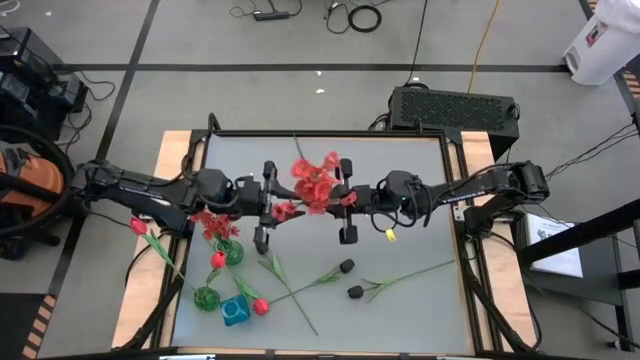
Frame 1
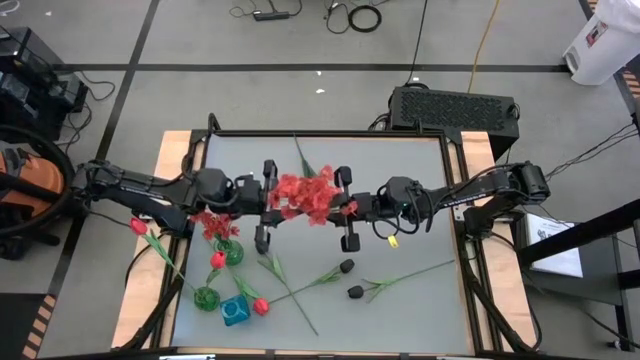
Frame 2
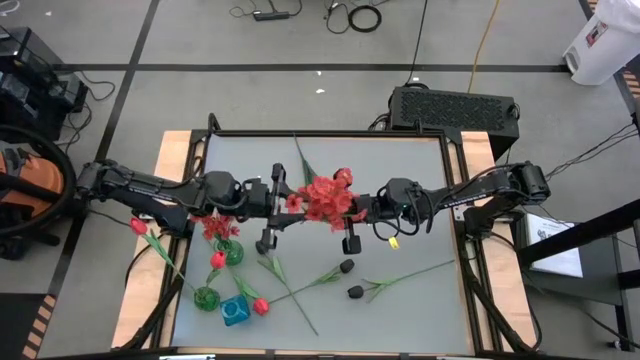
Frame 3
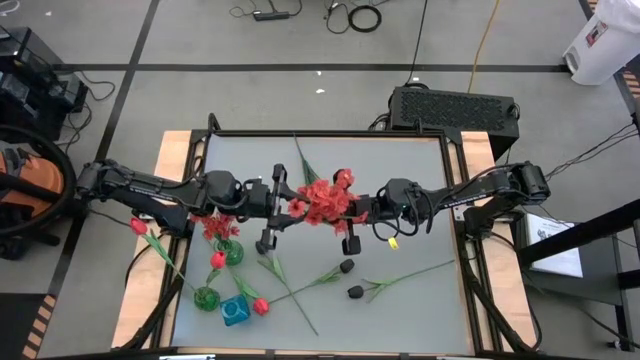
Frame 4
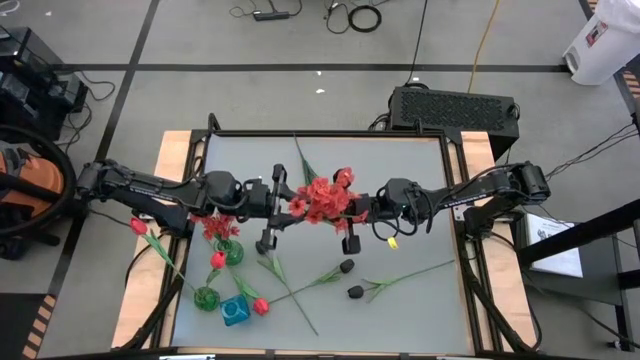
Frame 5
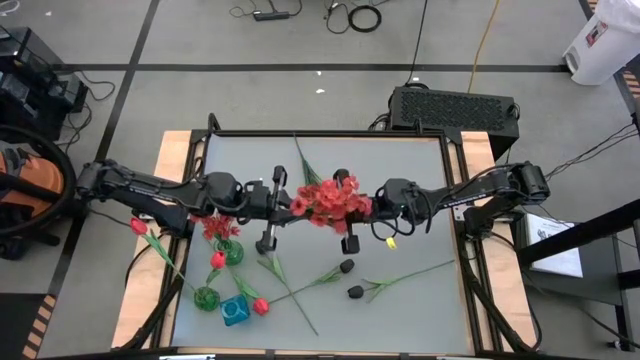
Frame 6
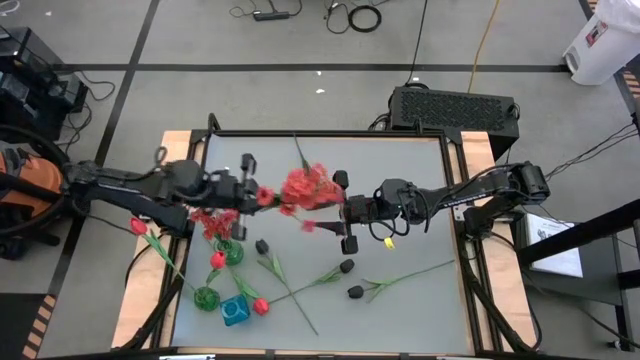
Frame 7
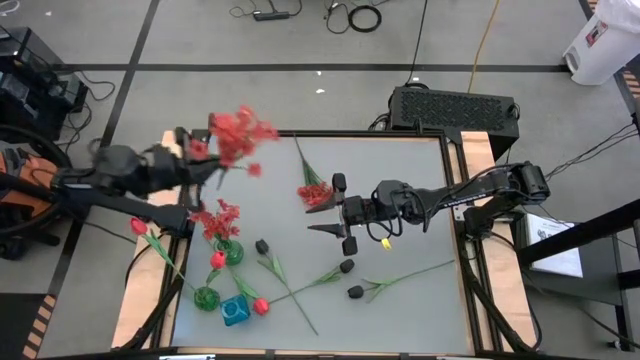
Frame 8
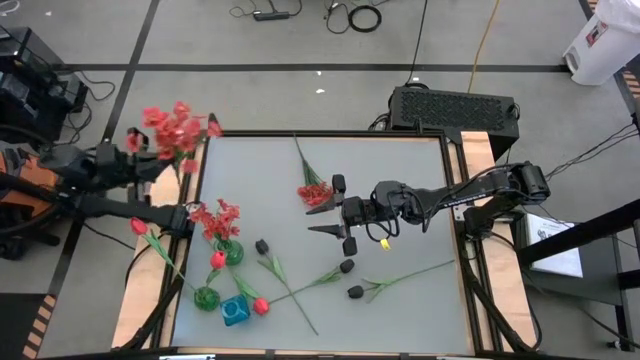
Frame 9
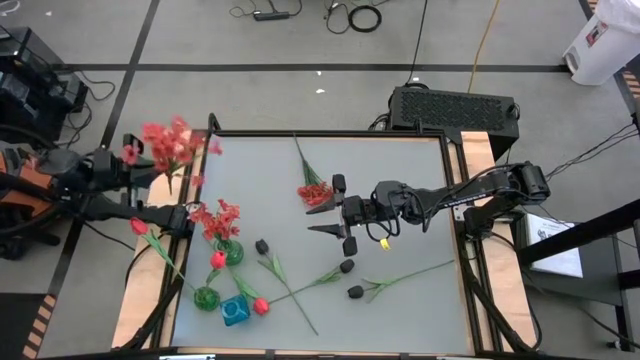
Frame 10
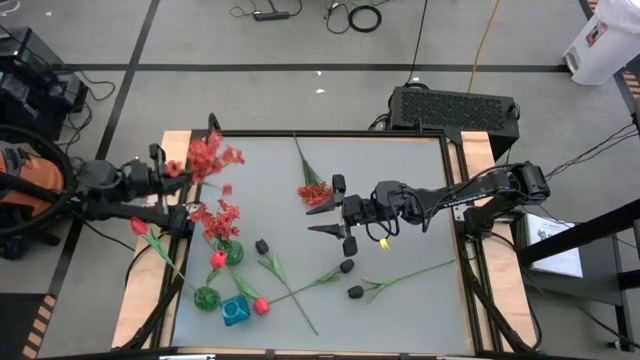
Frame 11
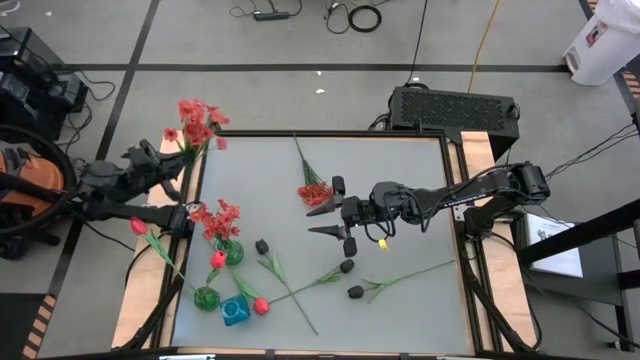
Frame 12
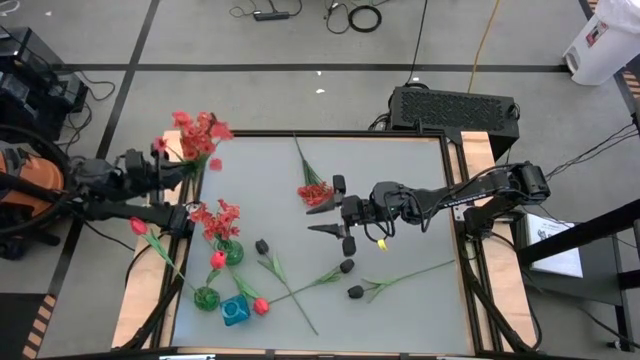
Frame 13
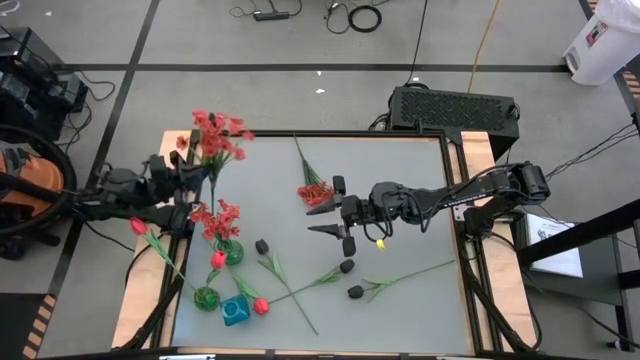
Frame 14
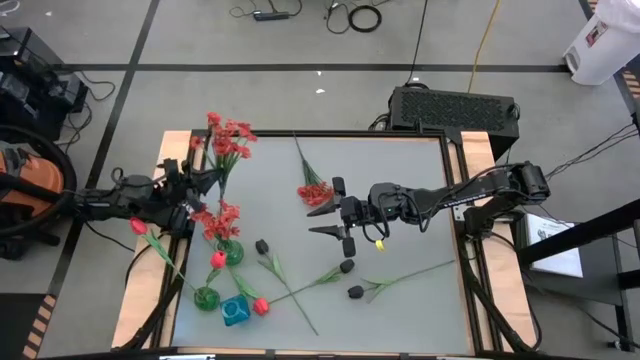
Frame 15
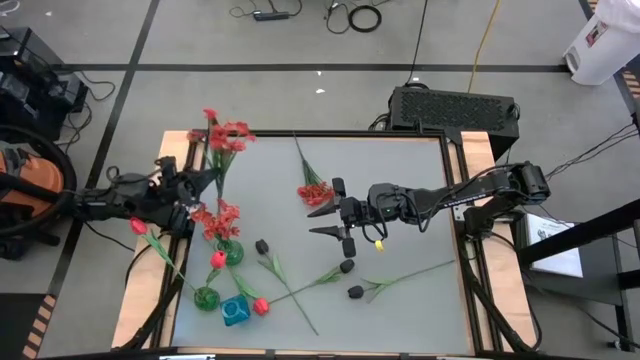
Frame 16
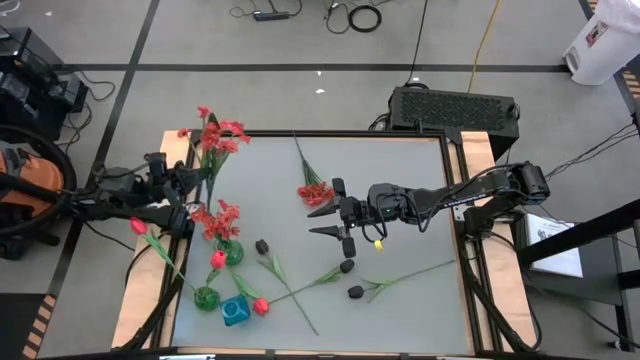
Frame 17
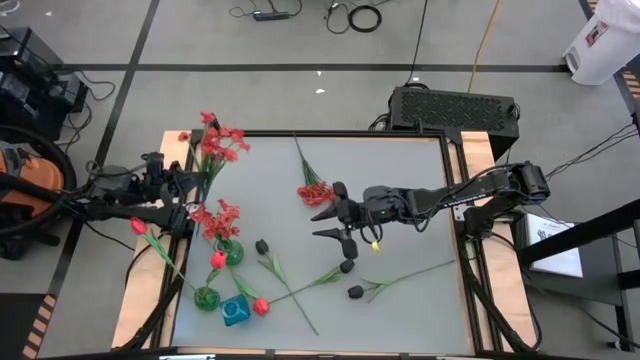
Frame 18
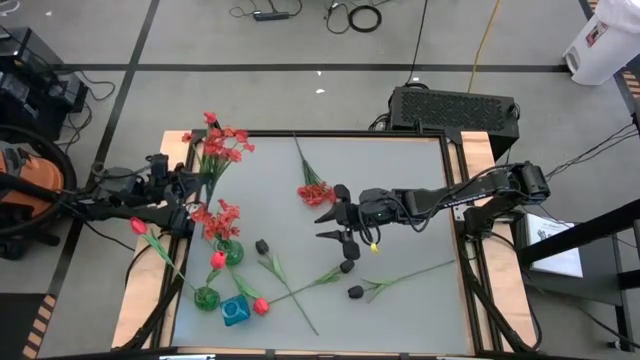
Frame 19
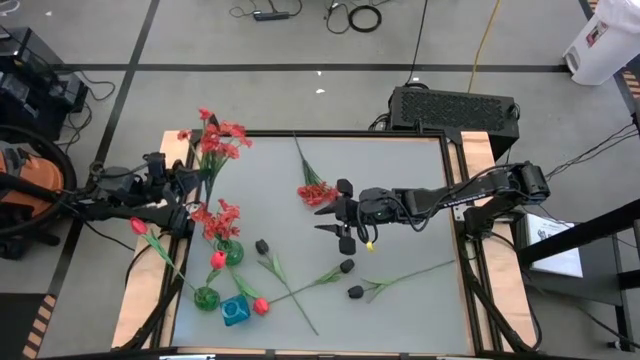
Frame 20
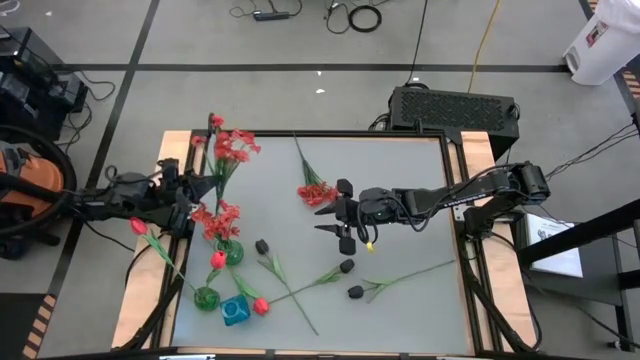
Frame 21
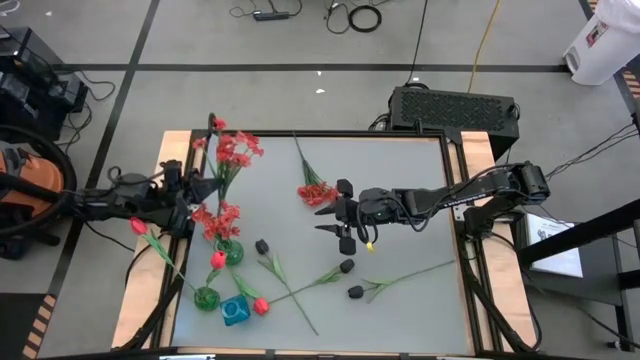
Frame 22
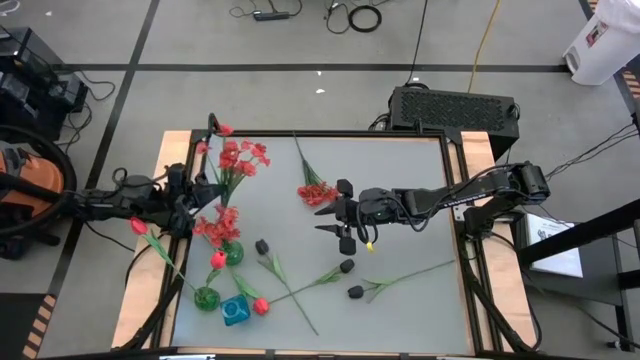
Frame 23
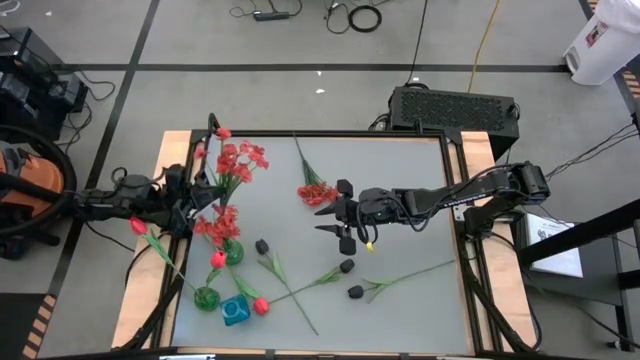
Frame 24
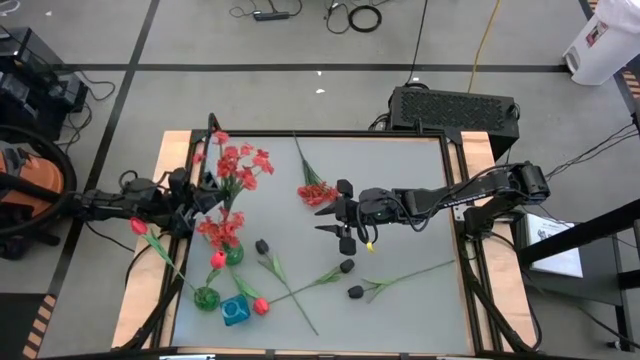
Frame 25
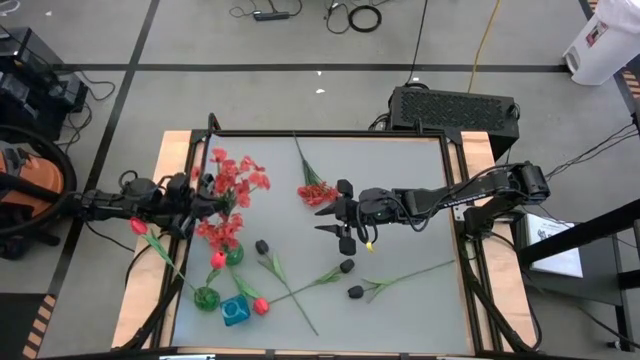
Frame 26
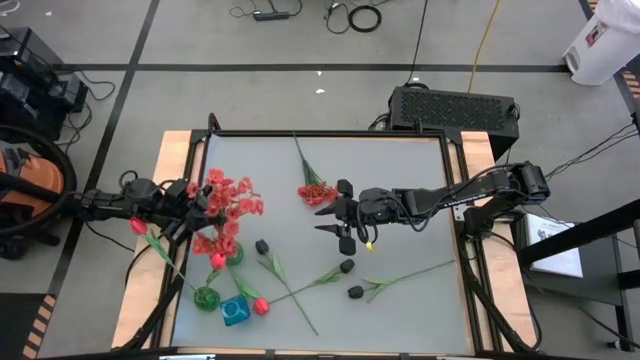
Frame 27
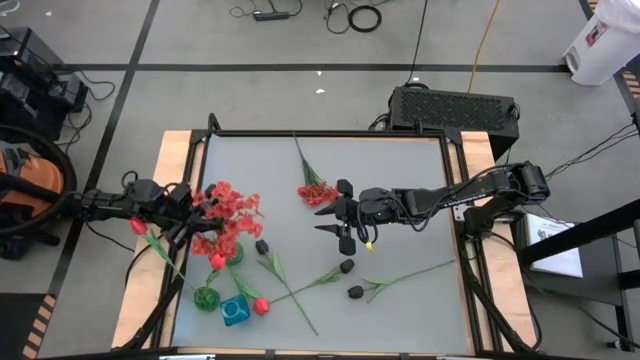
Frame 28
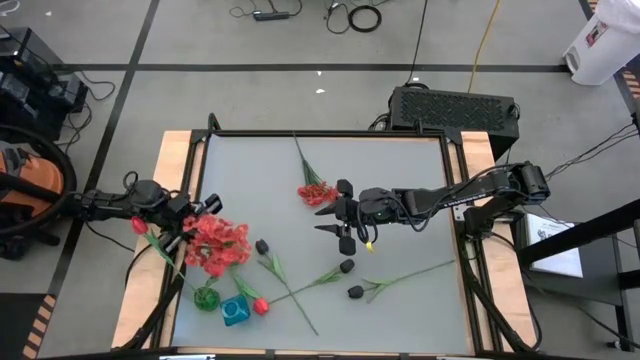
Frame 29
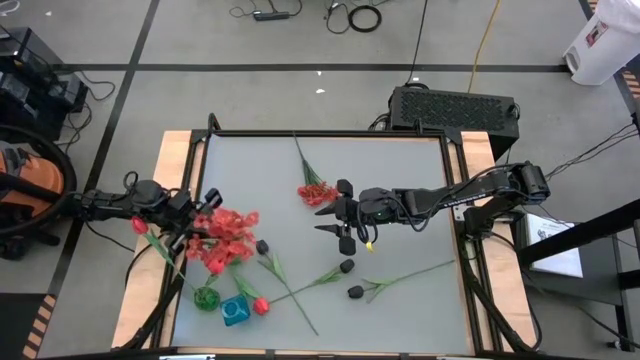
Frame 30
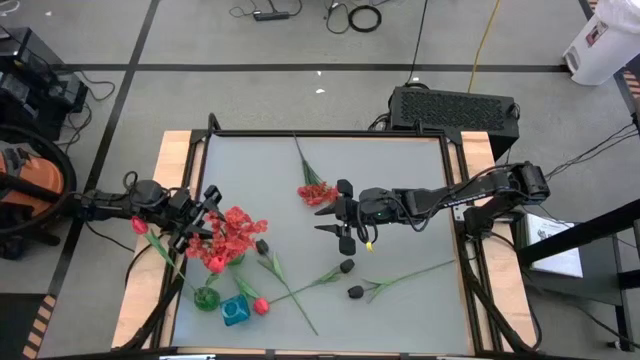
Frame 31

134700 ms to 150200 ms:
Task: Sort flowers into vase by color
Put the right orange flowers into the top green vase

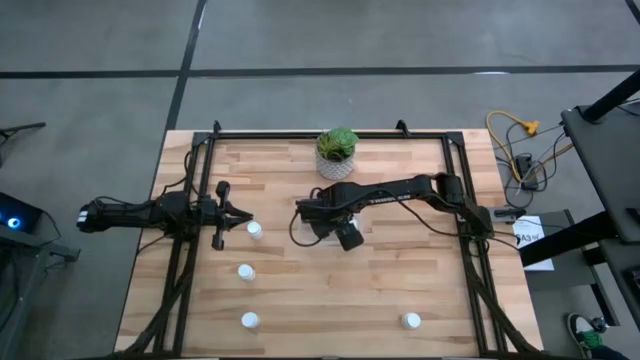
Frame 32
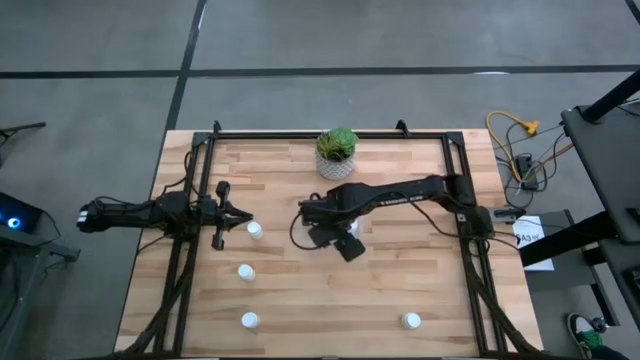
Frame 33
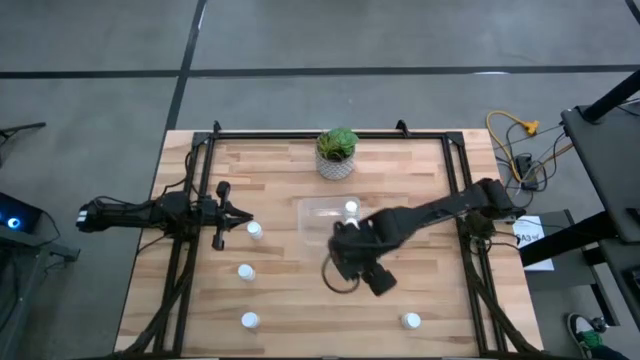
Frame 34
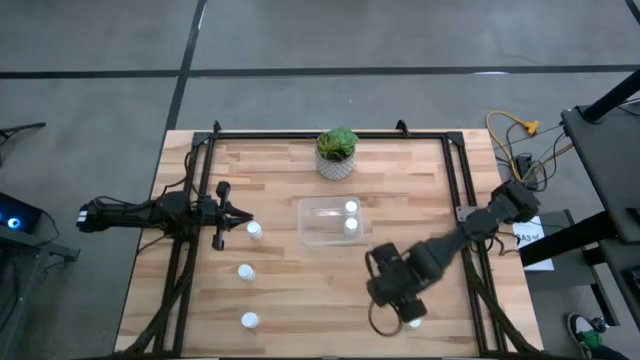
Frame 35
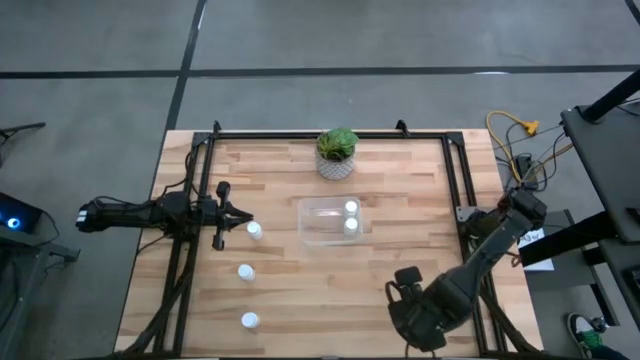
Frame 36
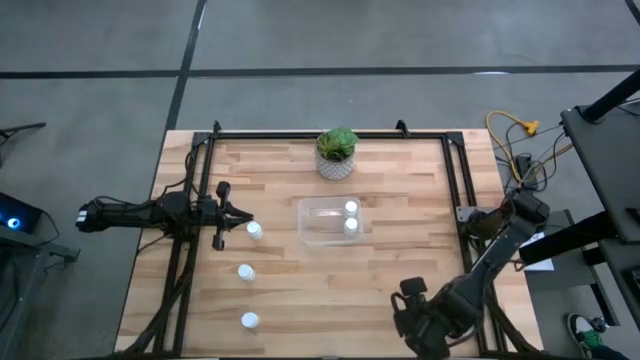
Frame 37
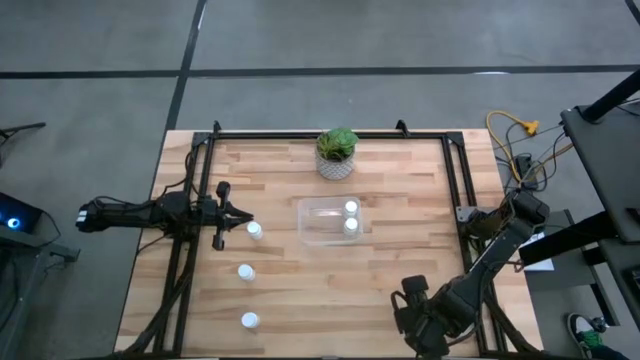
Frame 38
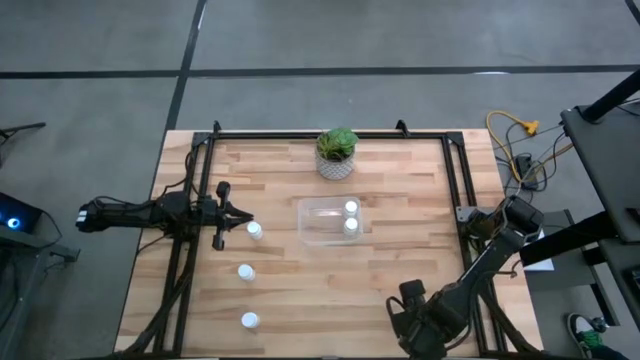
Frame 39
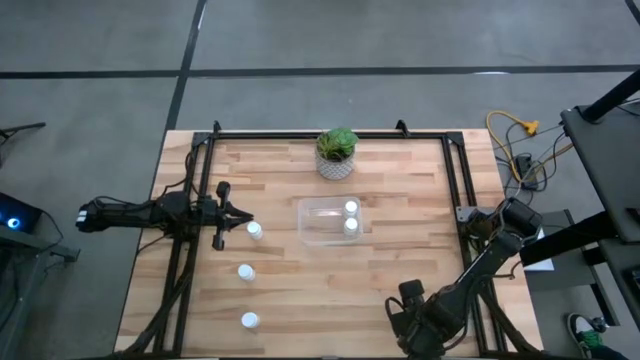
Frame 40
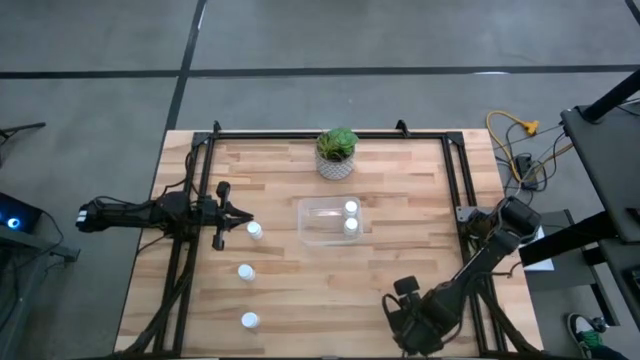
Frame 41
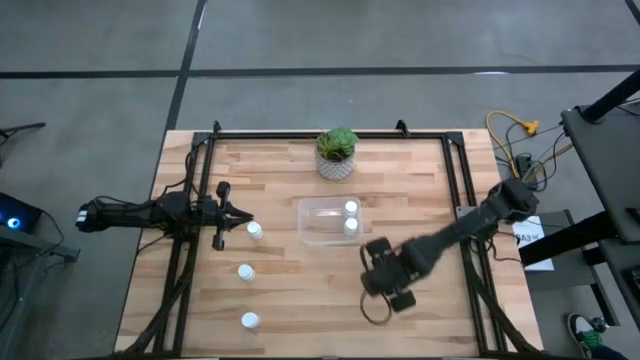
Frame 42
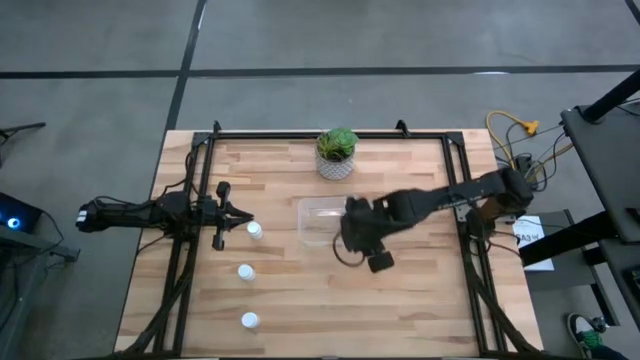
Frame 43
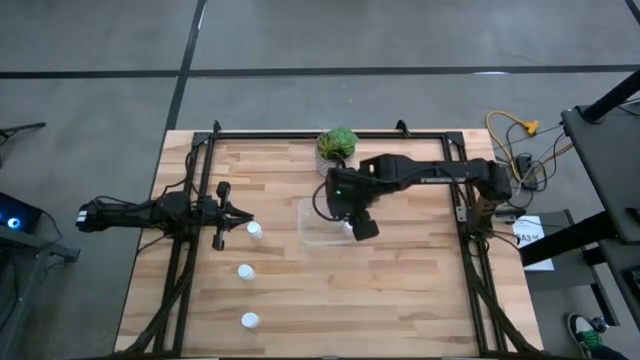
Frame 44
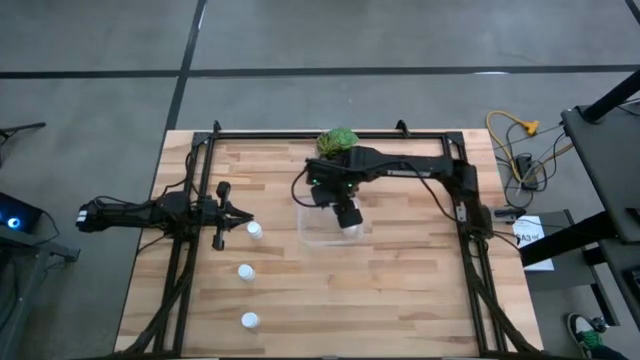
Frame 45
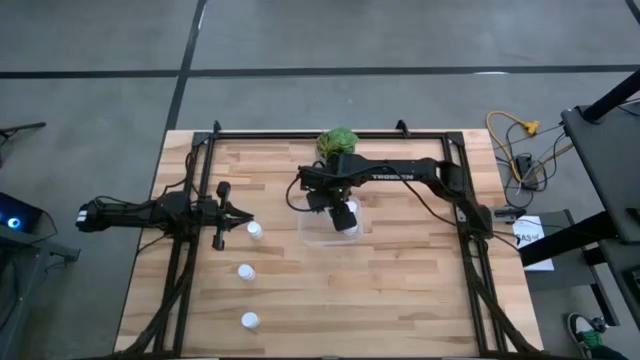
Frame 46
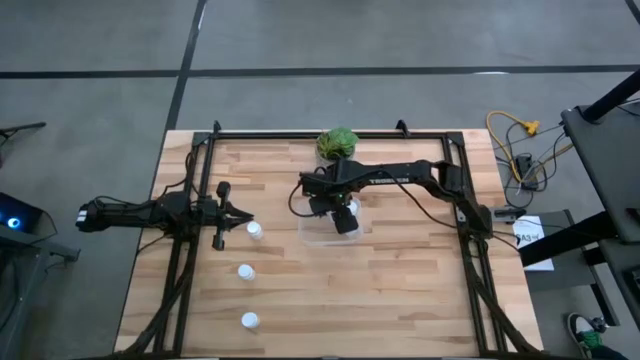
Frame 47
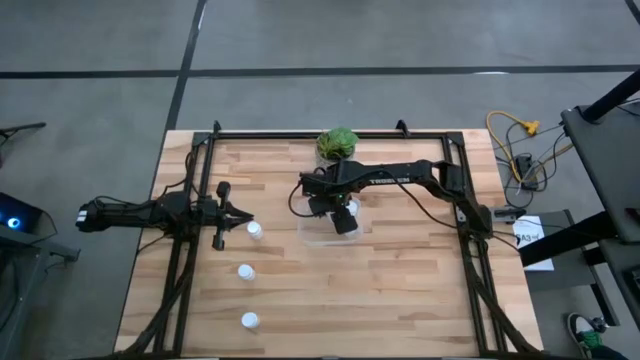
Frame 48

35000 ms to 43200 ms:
Task: Pick and place pill bottles into a basket
Put the white medicine bottle into the transparent bin
